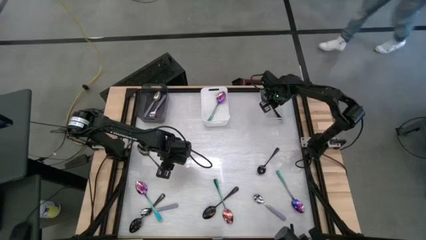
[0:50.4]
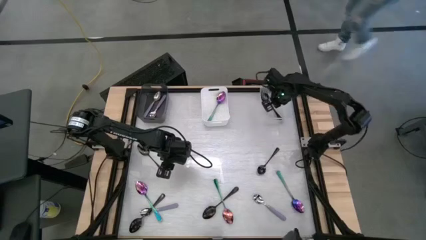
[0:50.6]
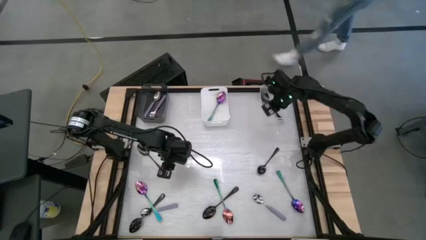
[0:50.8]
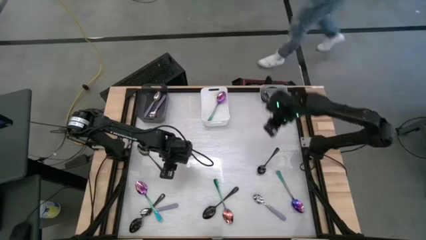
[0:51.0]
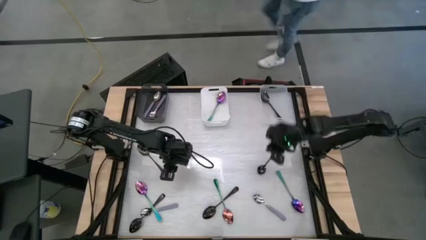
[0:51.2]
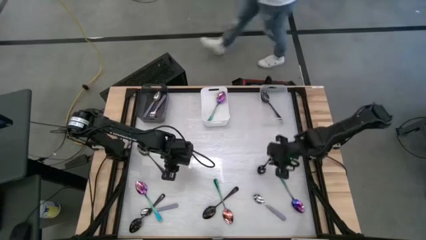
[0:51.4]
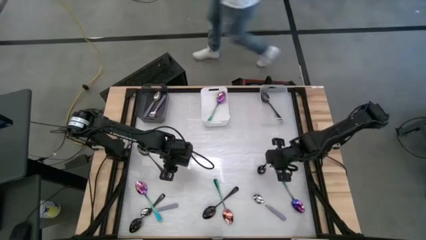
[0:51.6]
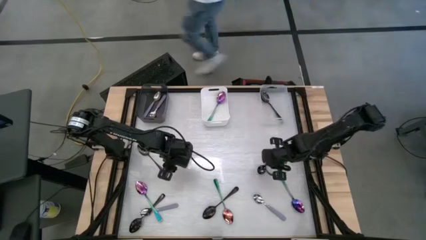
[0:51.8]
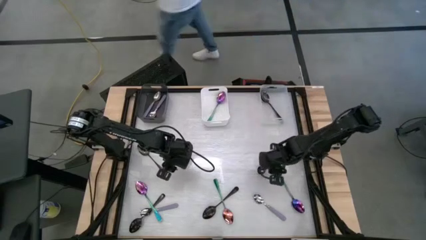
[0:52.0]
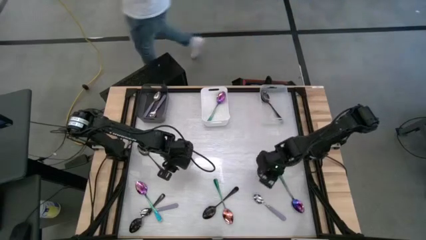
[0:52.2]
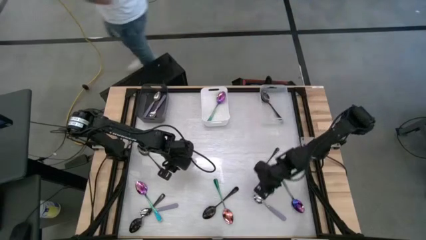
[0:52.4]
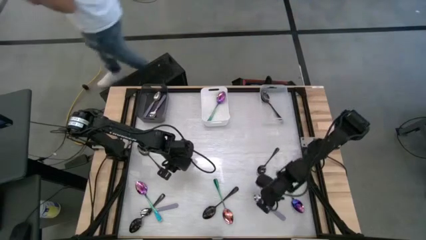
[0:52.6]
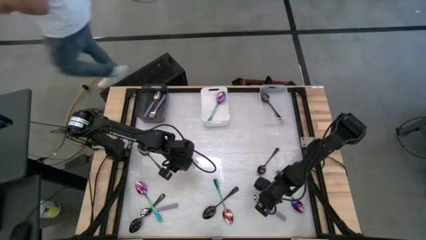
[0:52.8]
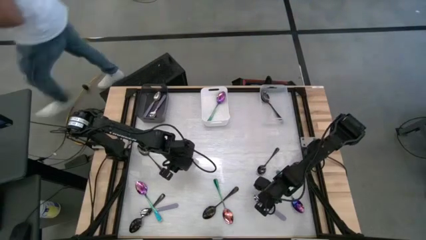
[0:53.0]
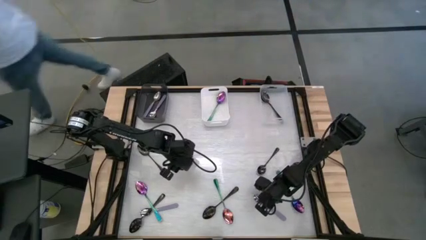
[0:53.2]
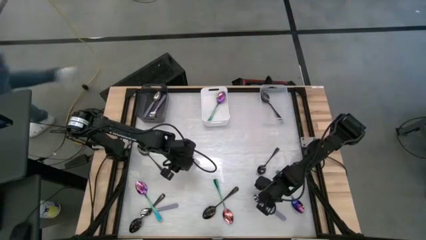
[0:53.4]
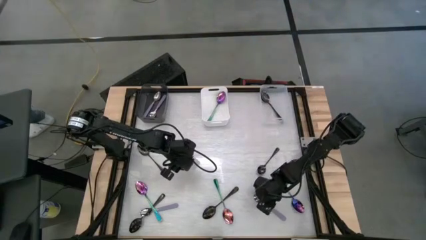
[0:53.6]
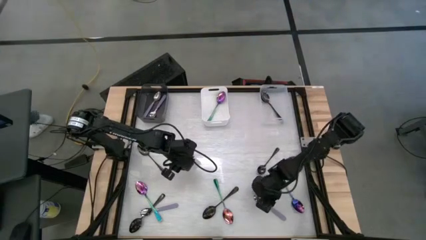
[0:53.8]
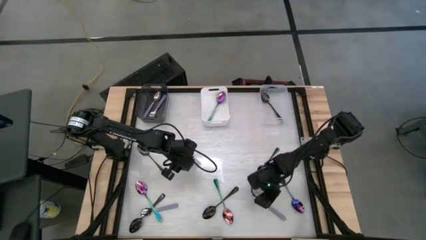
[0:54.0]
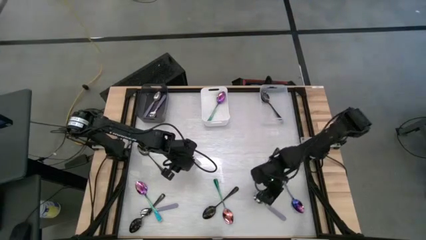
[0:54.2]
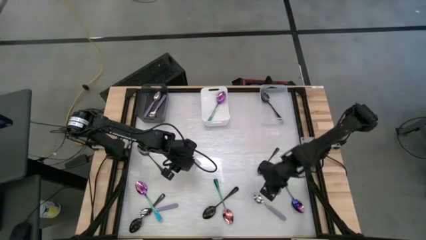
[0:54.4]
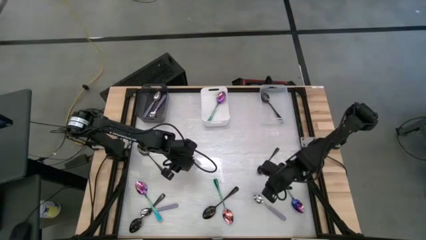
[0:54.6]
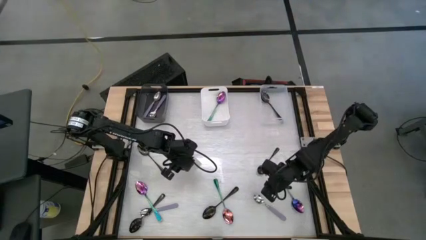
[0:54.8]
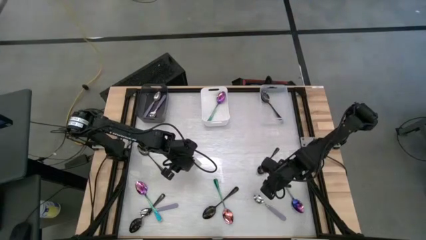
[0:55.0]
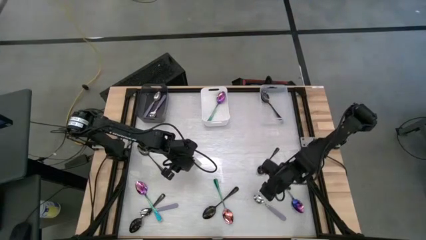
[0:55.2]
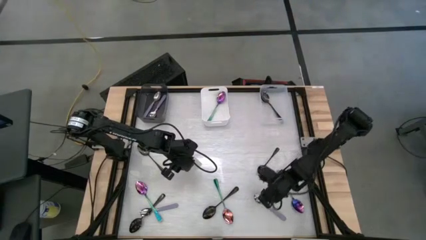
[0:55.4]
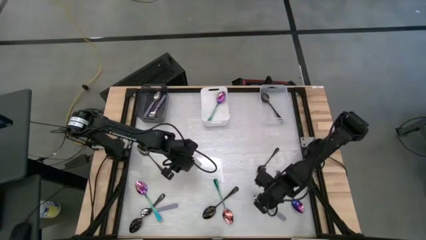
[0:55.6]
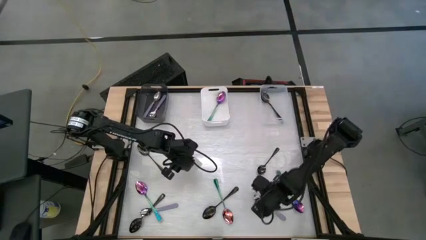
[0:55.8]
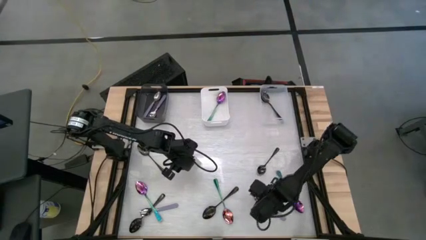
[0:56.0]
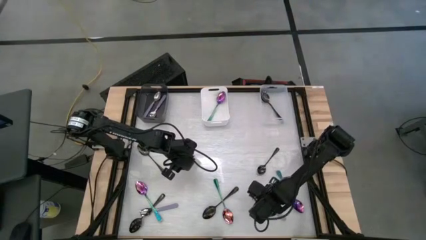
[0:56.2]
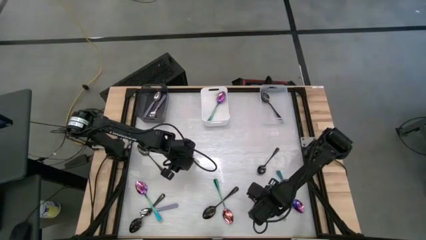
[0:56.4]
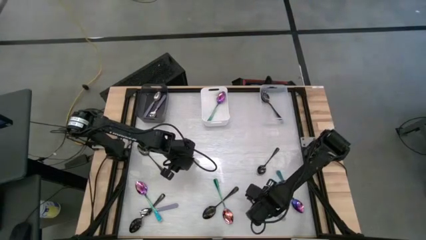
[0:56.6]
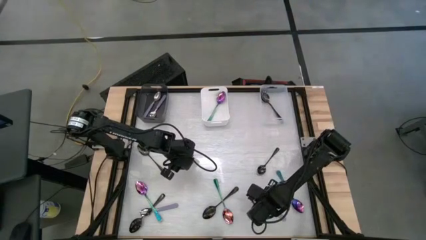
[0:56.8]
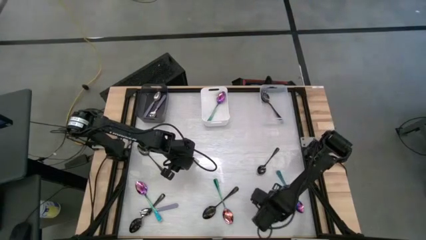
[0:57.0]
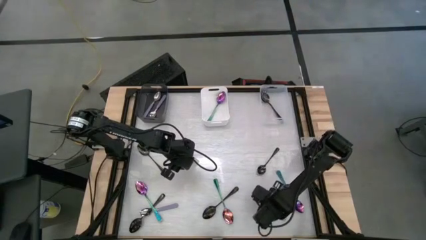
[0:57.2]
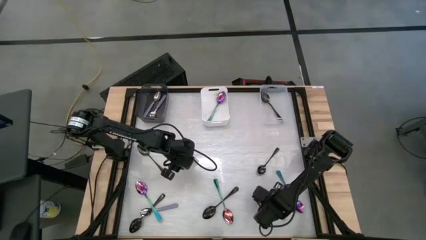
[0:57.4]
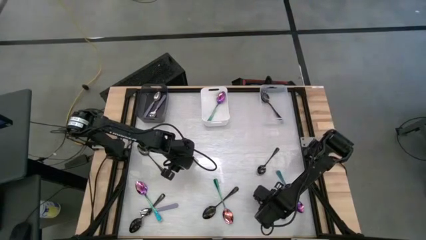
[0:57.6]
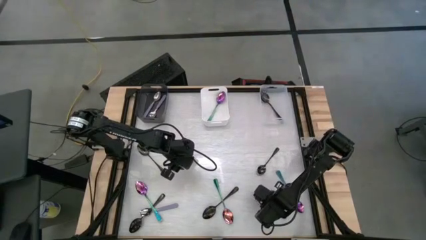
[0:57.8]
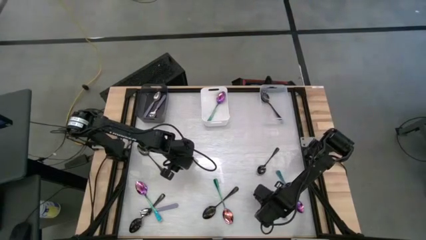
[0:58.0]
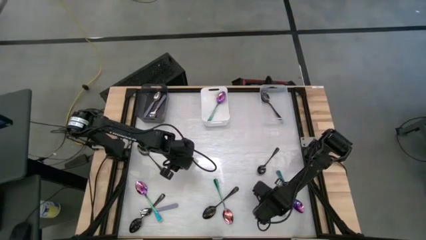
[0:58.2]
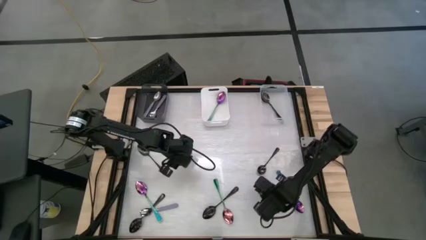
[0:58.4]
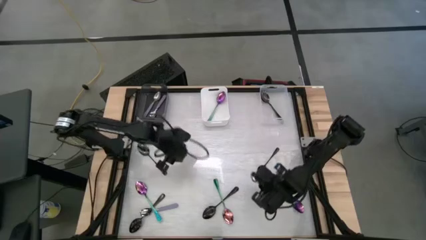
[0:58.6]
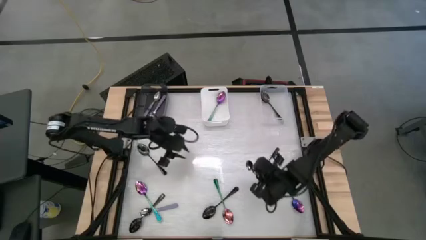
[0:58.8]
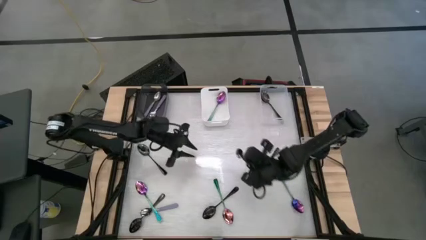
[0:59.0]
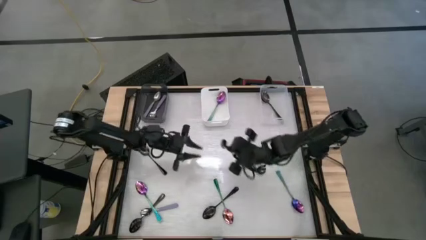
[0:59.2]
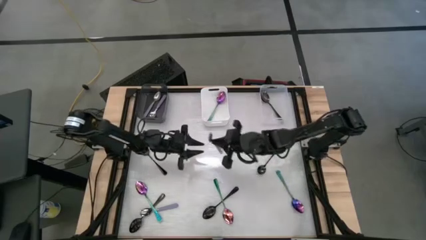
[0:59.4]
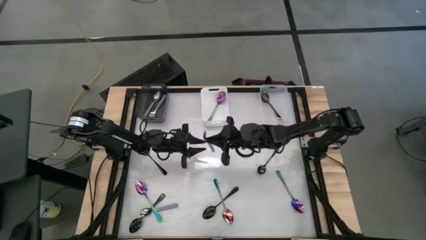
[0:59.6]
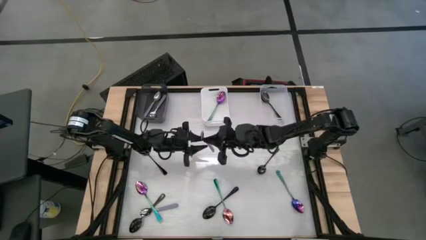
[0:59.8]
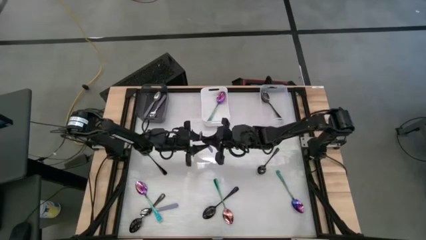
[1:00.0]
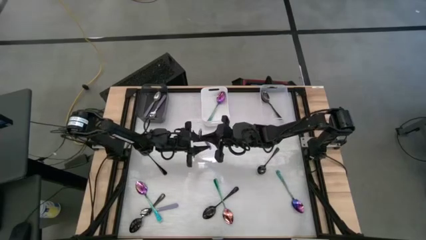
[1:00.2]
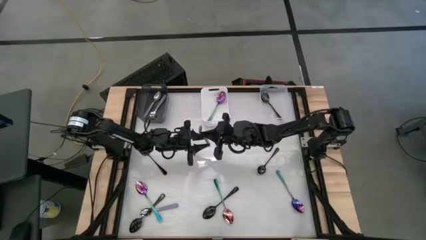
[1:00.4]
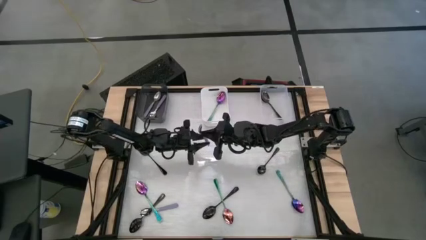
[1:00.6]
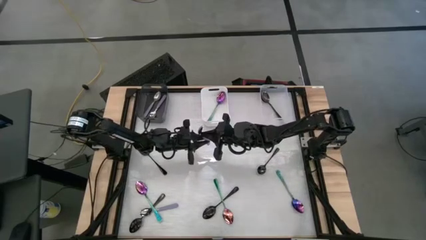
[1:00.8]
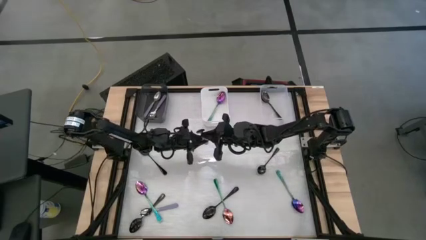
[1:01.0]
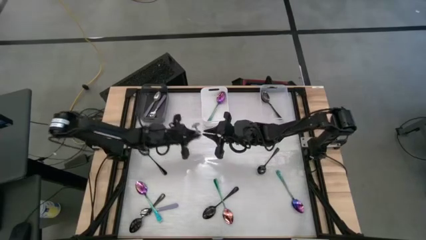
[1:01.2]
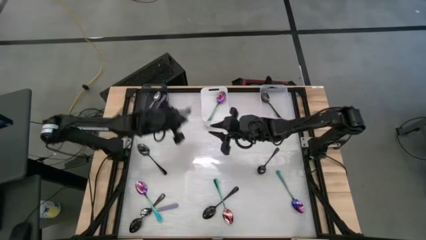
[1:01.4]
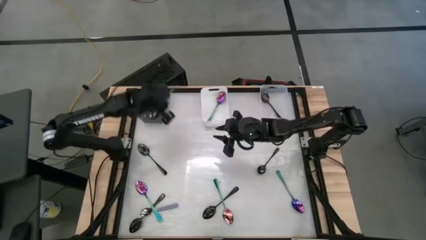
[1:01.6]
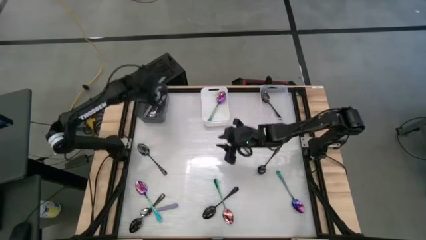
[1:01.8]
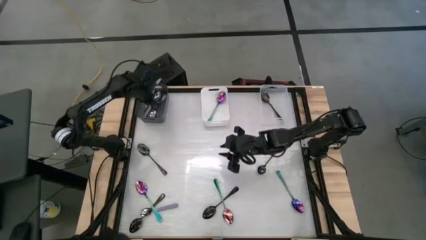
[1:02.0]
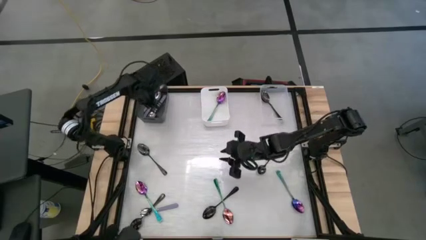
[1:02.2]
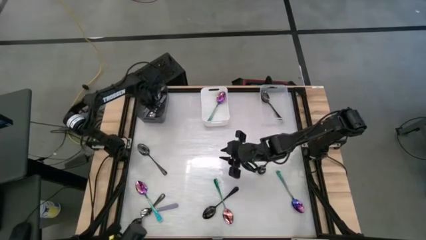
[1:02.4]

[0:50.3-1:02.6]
Task: Sort silverware by color (type)
Put the purple spoon into the transparent black bin

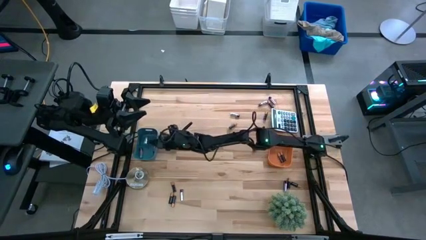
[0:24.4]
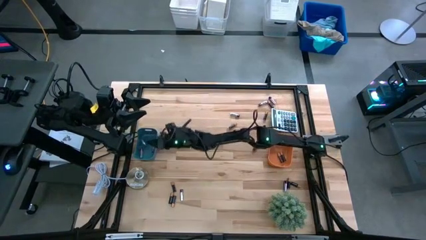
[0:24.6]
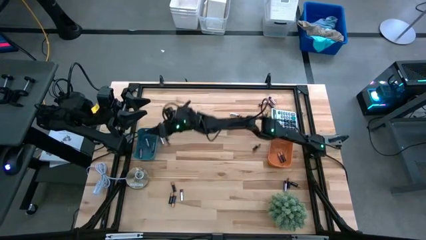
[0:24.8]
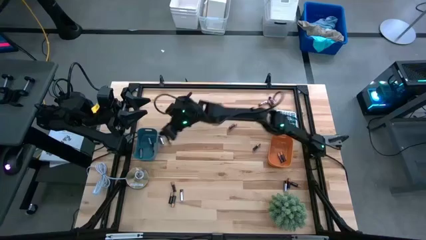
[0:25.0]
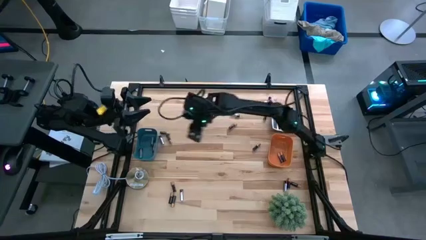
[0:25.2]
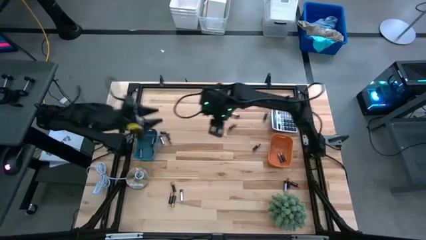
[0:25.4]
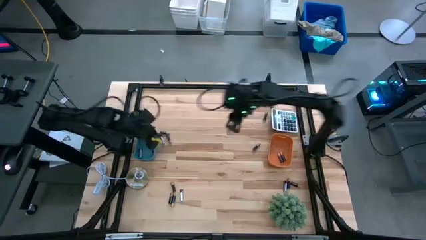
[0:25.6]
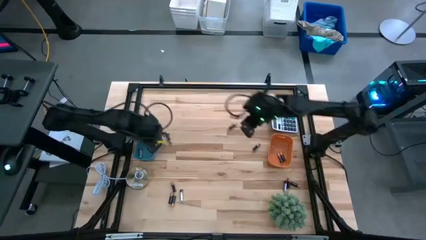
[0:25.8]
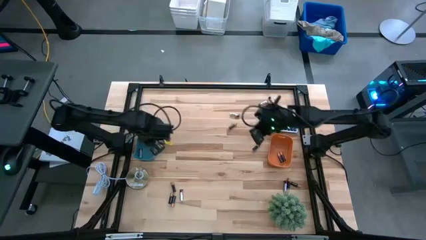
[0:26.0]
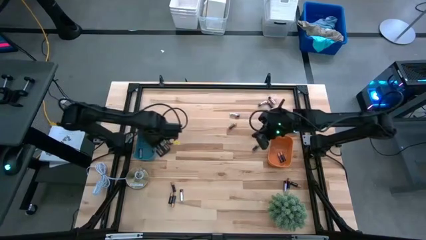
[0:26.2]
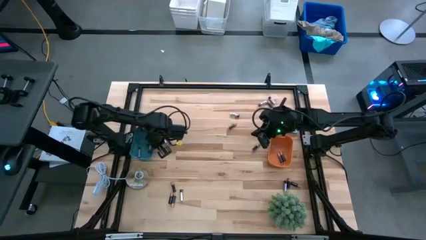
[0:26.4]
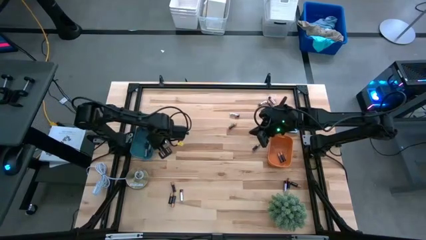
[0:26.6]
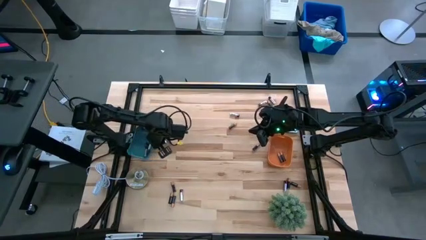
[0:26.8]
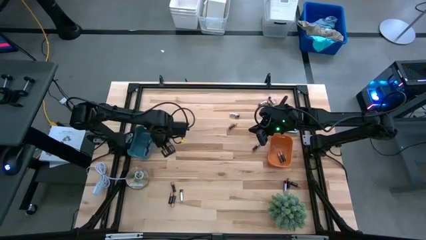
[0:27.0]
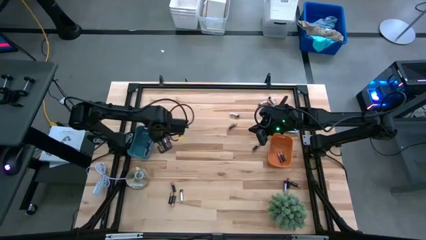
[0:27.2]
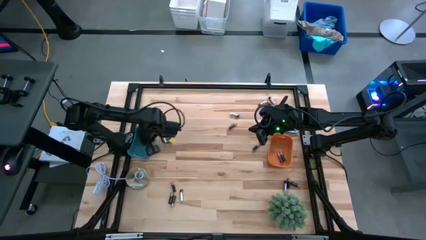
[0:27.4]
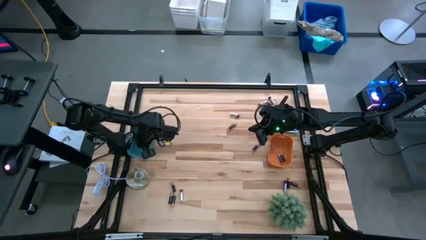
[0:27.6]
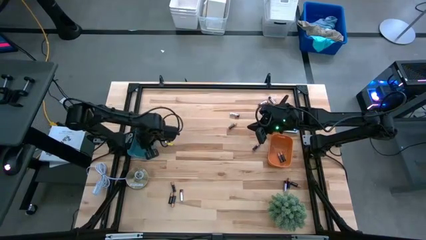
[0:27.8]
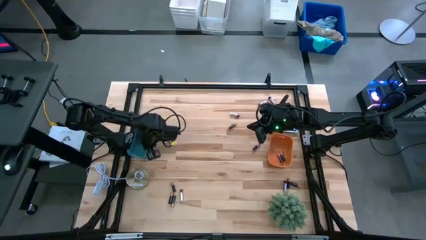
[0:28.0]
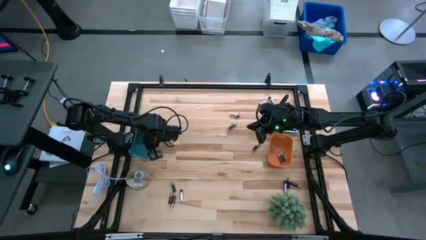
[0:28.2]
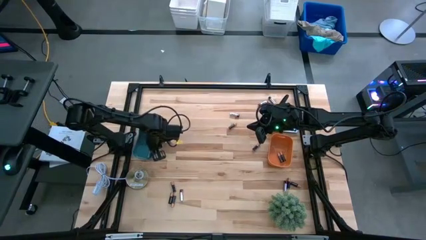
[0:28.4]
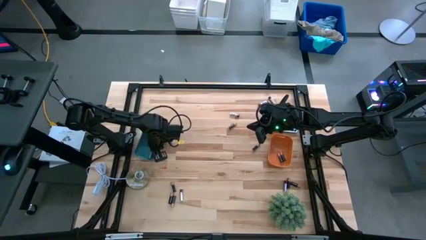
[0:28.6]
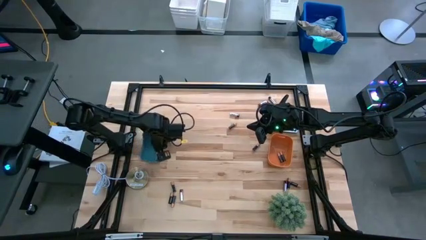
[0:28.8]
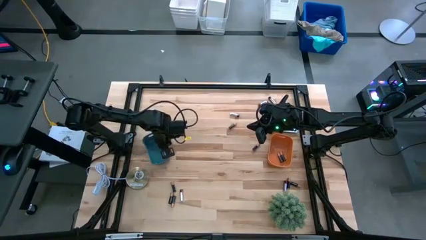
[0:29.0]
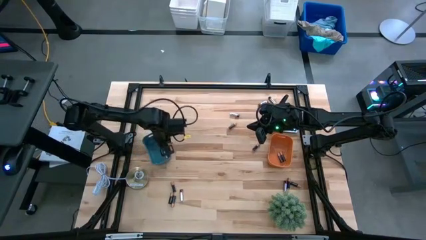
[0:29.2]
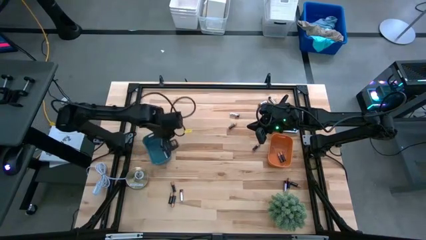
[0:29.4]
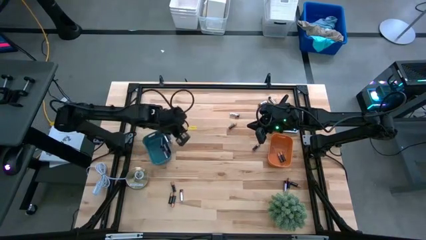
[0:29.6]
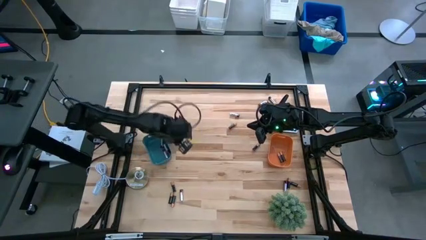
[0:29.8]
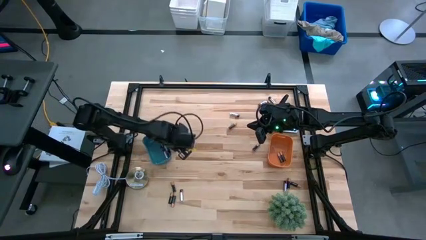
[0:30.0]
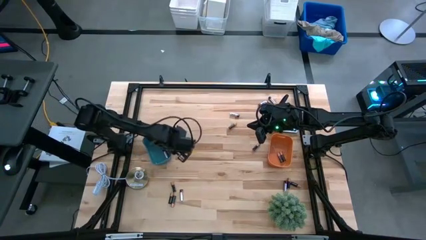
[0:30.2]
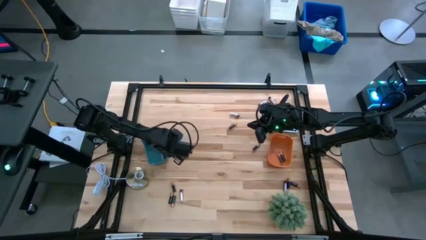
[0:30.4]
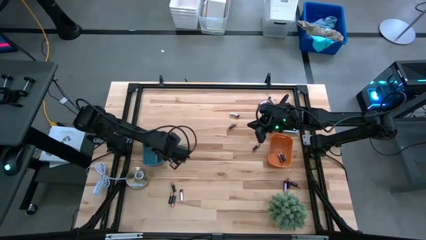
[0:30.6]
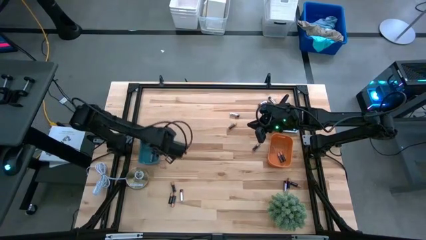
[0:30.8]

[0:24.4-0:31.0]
Task: Sort batteries
Adjust the blue bin
